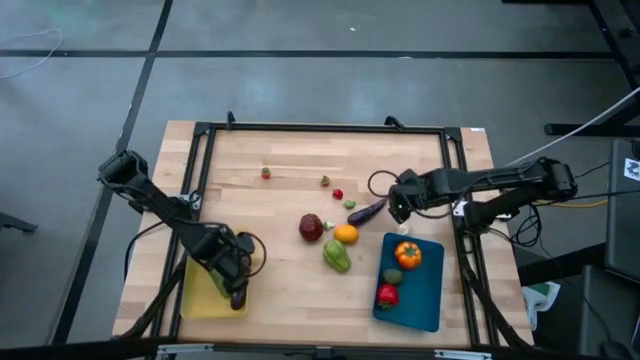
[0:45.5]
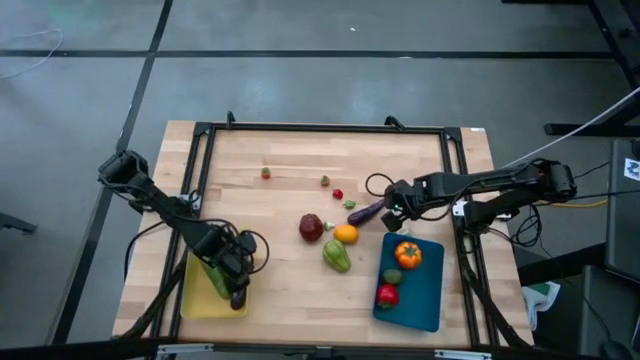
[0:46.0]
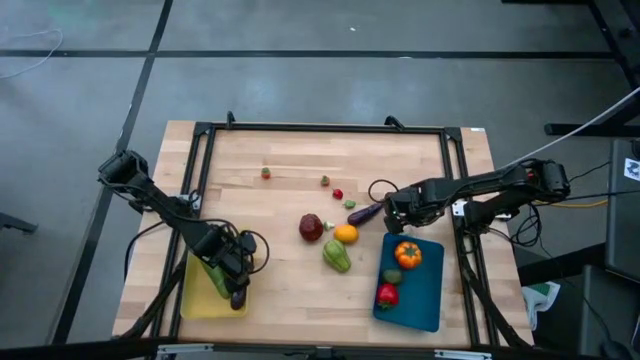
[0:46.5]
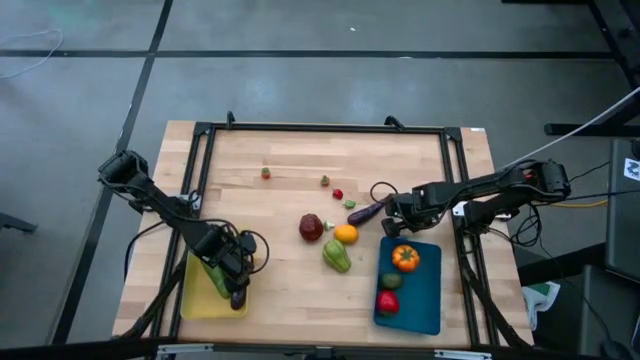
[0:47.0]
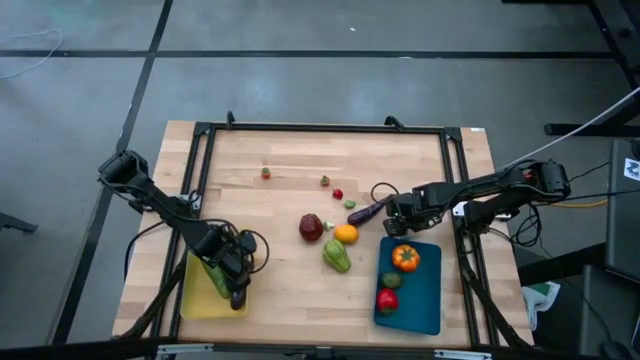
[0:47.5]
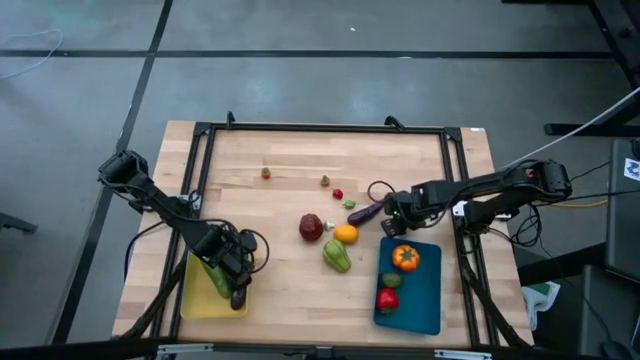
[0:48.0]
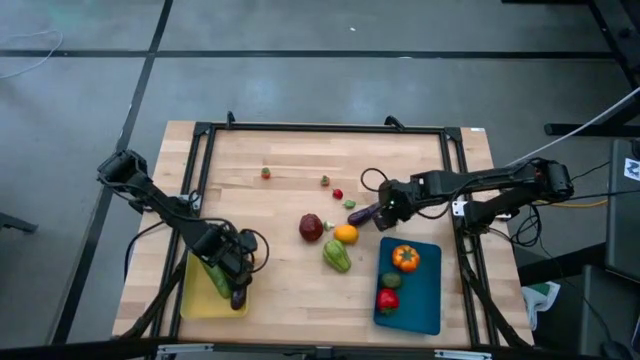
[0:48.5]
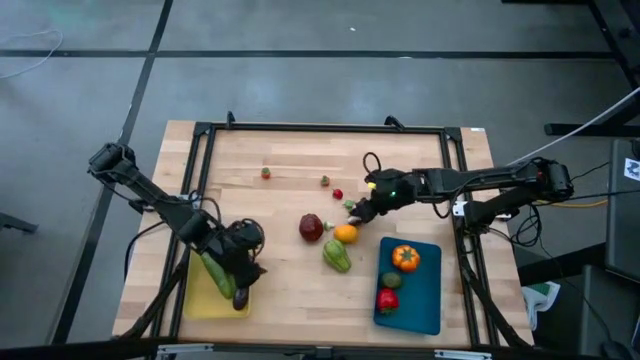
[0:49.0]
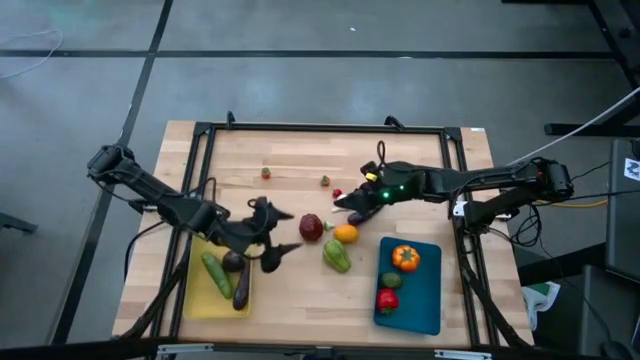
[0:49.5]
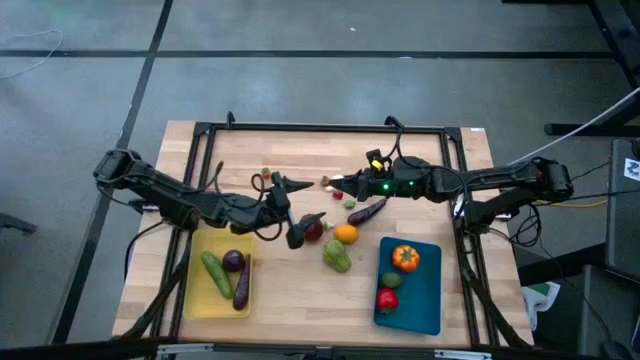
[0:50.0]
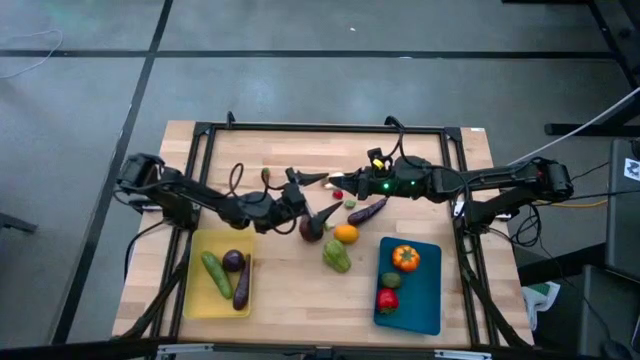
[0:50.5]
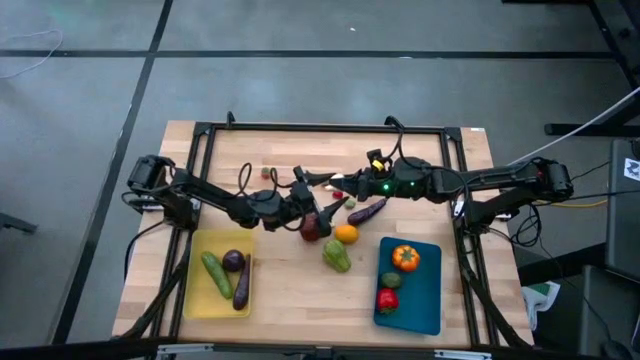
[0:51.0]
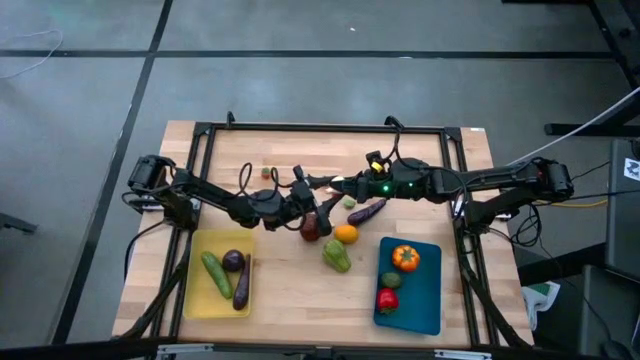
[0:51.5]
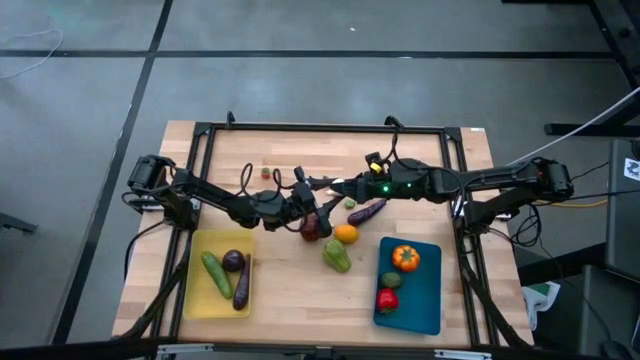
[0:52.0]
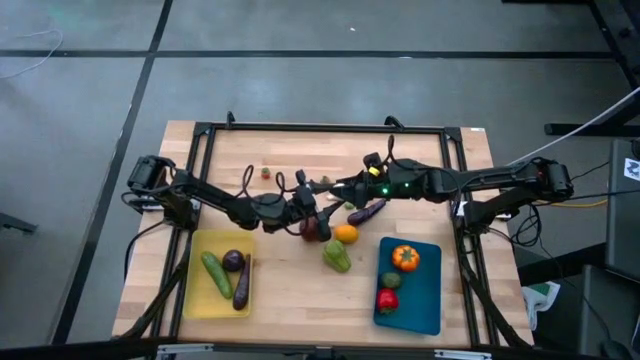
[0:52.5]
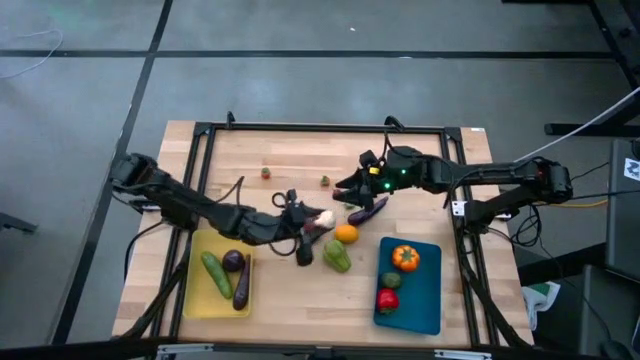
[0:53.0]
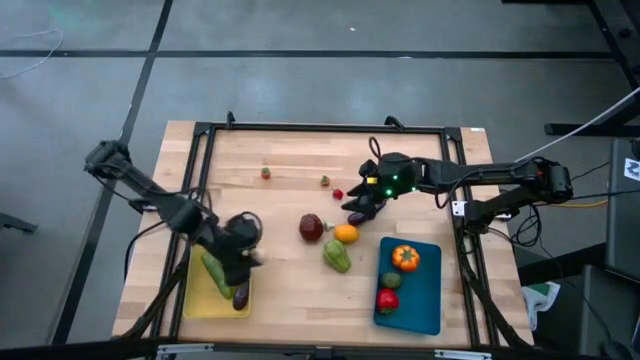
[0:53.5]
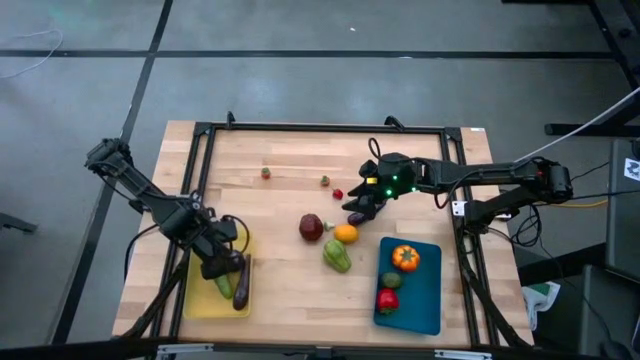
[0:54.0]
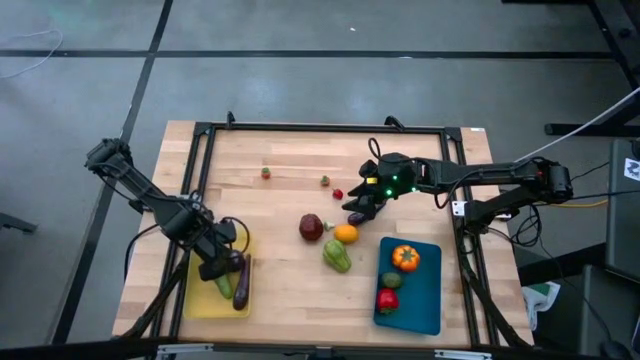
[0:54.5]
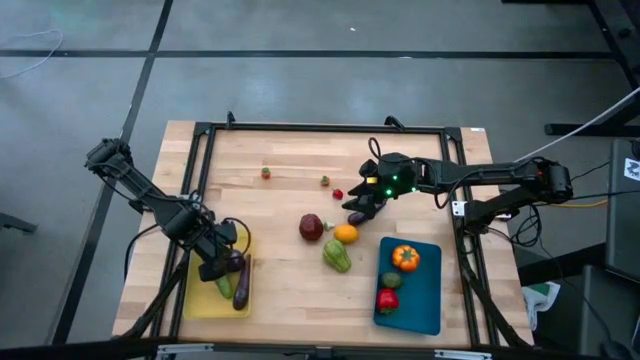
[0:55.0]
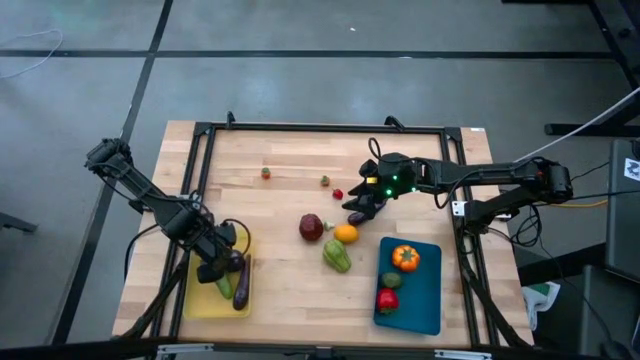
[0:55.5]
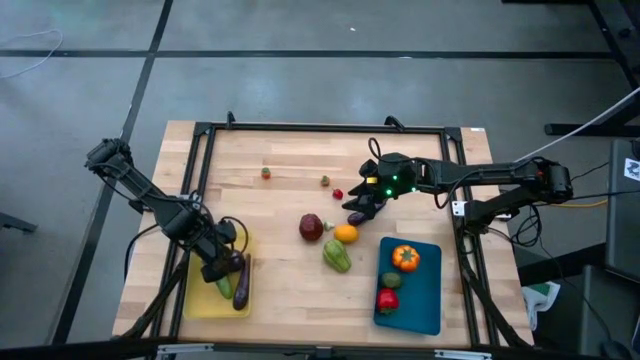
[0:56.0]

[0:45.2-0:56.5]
Task: Sort produce into baskets
Put the garlic into the yellow bin

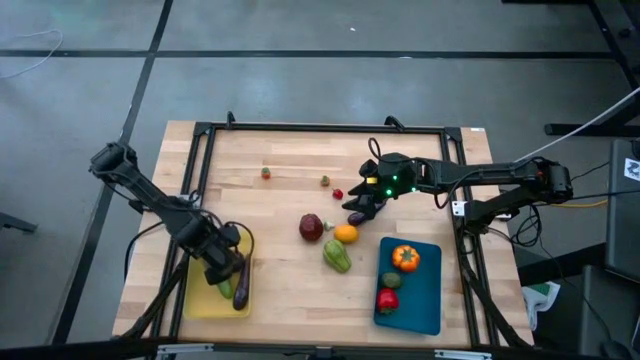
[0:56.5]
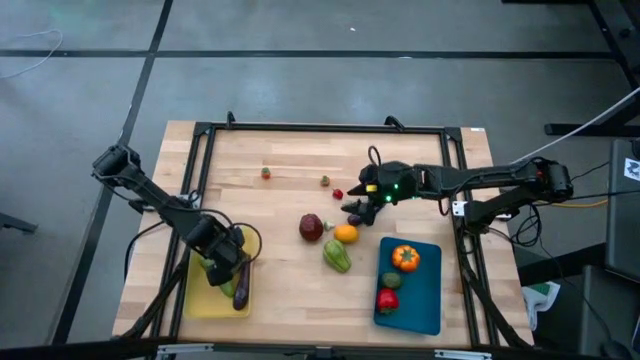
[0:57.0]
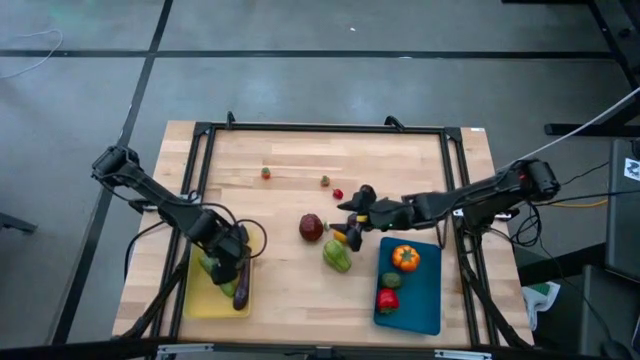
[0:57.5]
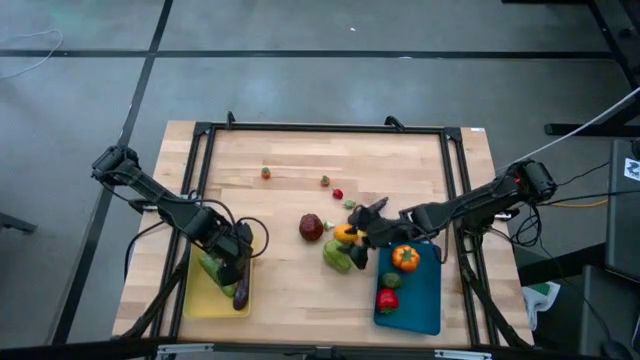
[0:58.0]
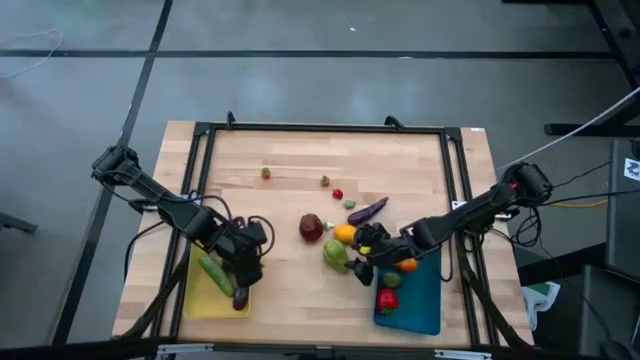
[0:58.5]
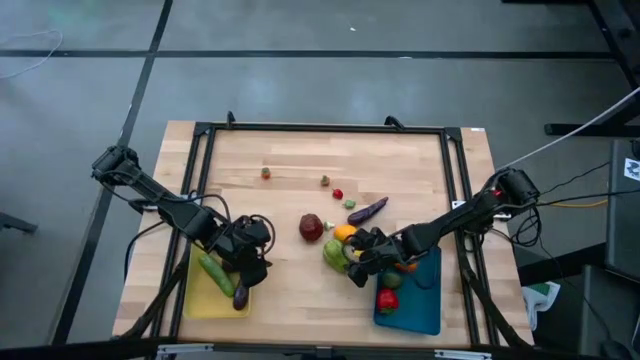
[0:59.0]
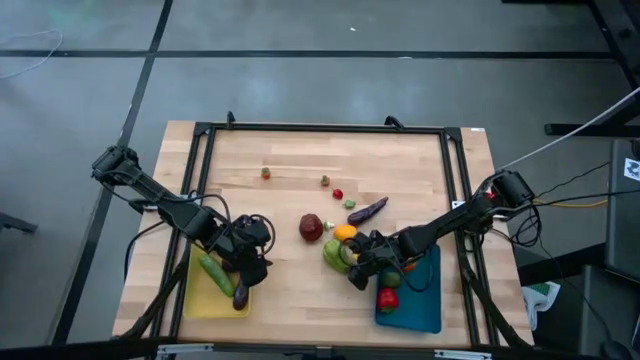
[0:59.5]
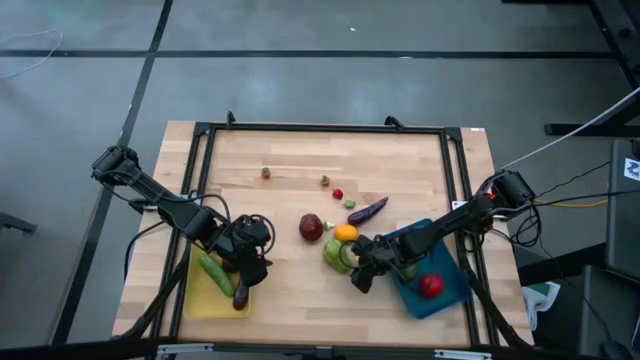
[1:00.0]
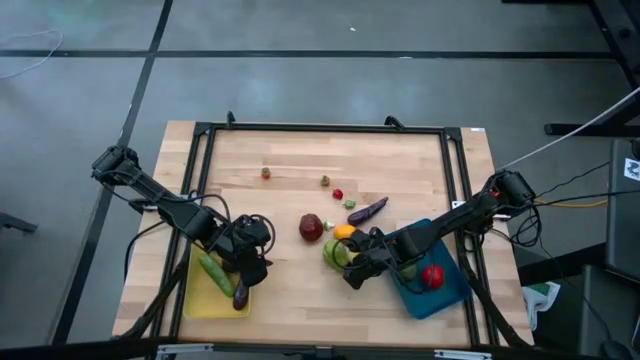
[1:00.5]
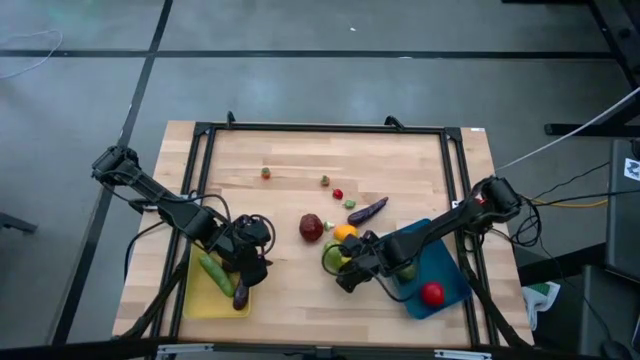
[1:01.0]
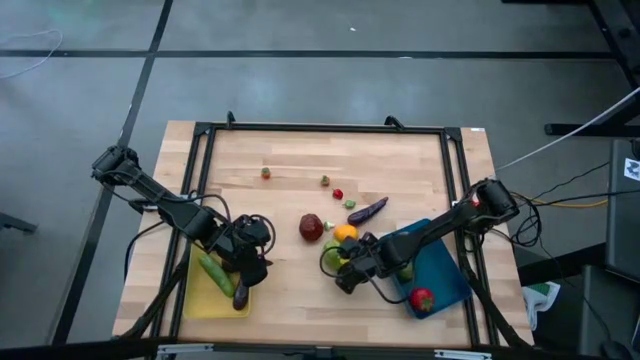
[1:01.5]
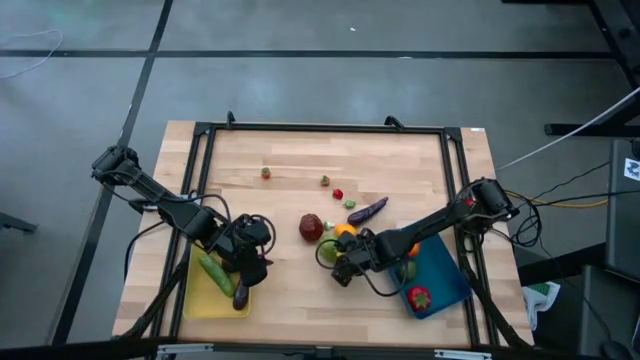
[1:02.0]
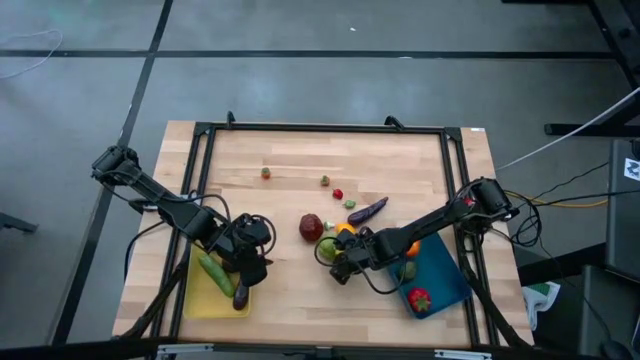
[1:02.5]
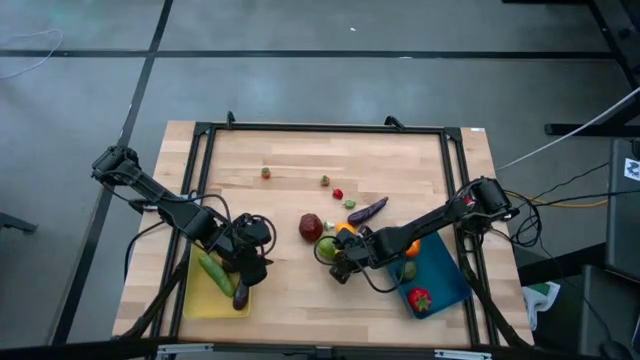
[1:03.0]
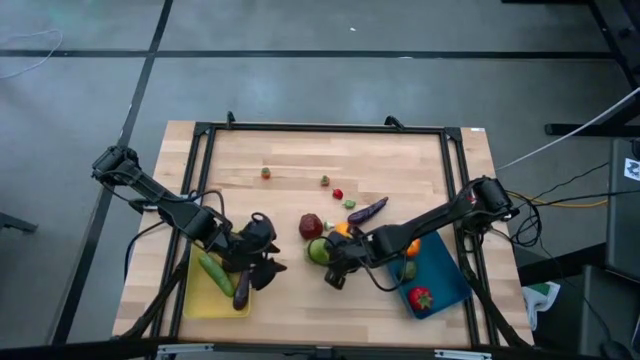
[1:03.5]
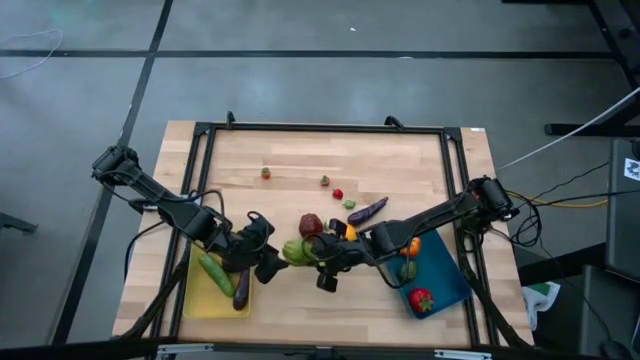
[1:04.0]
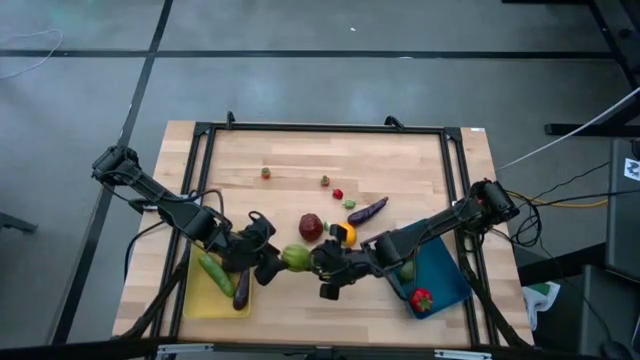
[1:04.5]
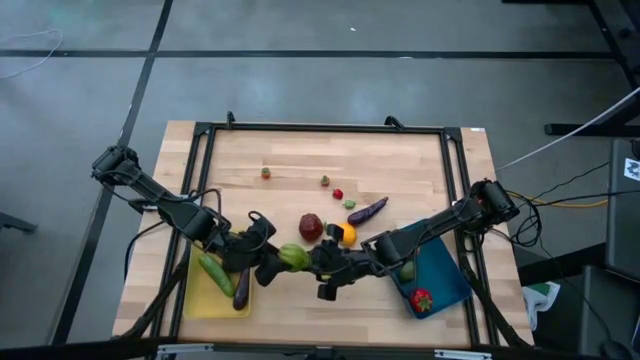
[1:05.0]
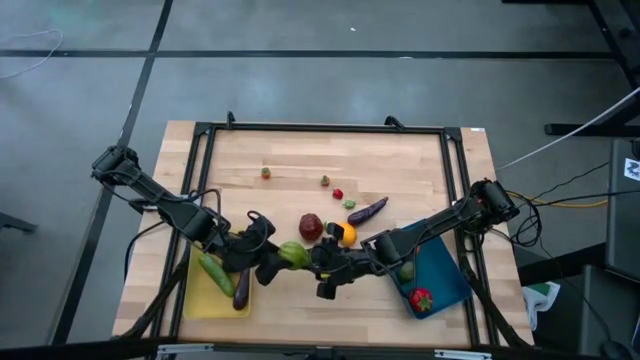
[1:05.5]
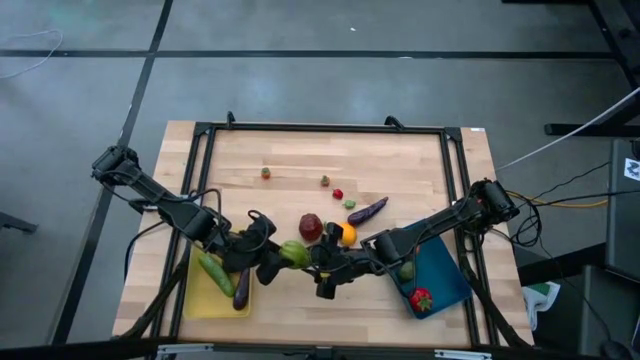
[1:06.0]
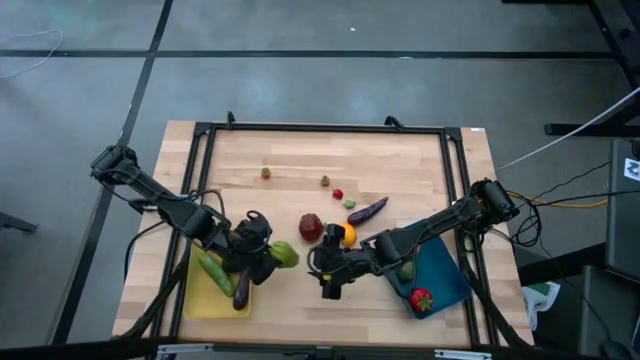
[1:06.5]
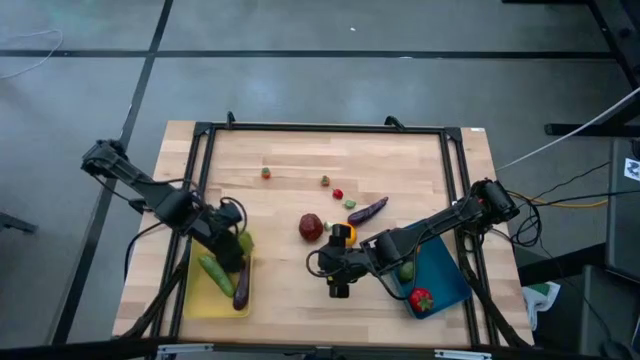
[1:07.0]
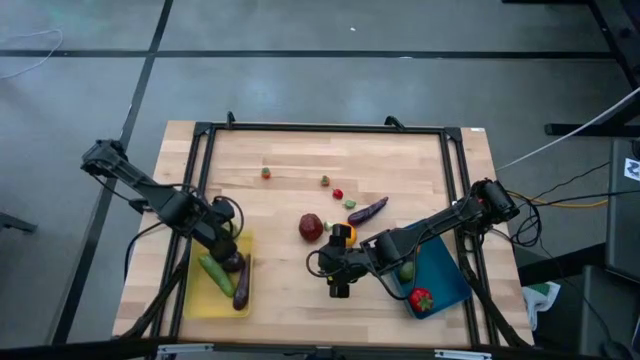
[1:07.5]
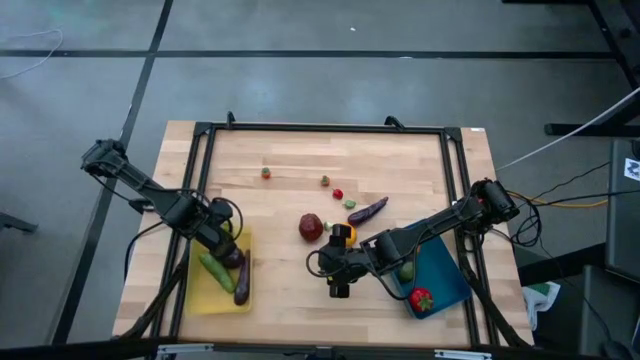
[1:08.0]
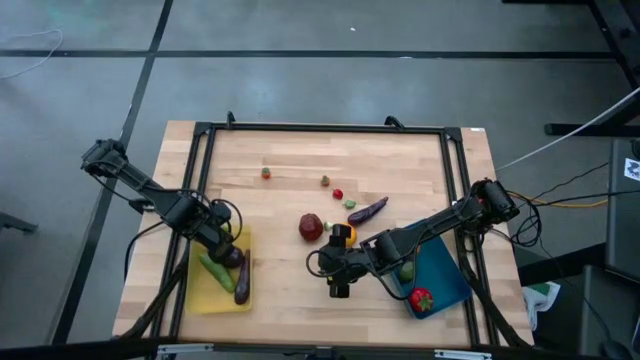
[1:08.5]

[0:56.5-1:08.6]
Put the chayote into the yellow bin
